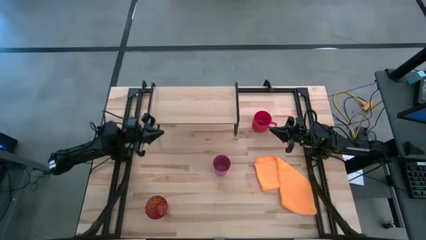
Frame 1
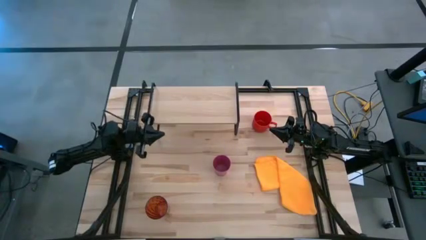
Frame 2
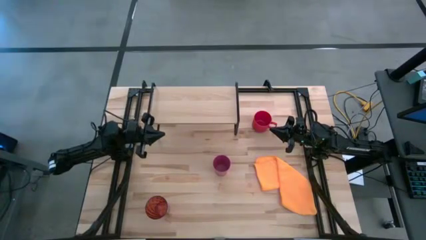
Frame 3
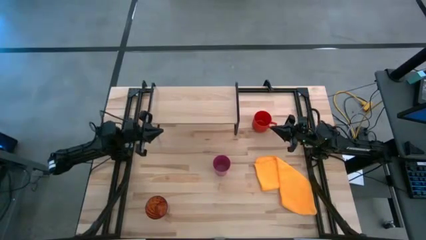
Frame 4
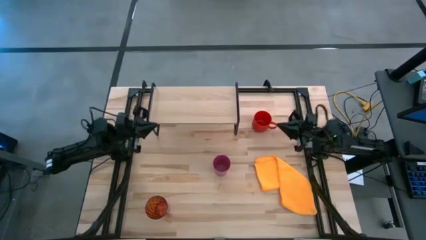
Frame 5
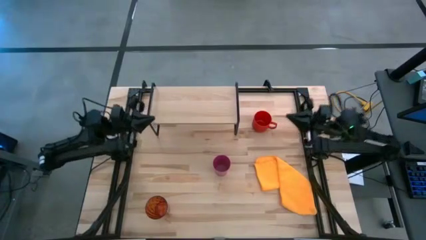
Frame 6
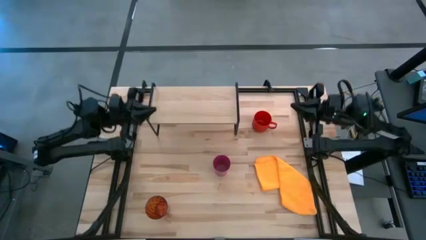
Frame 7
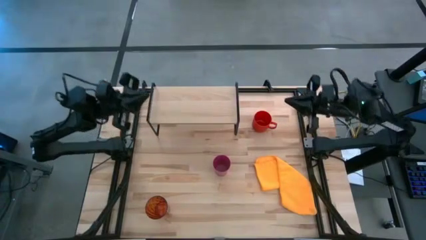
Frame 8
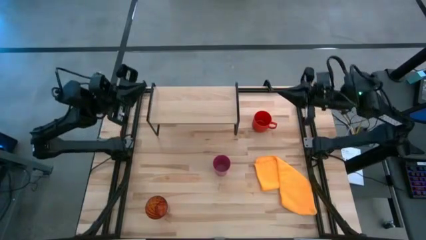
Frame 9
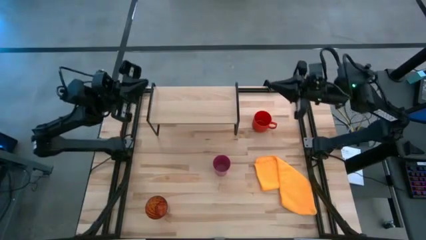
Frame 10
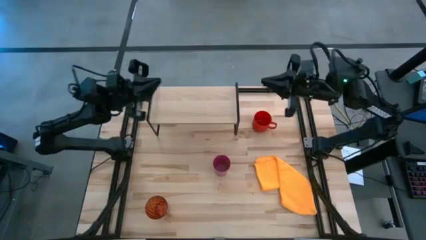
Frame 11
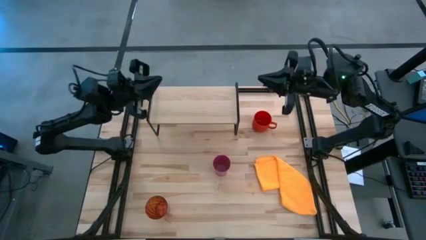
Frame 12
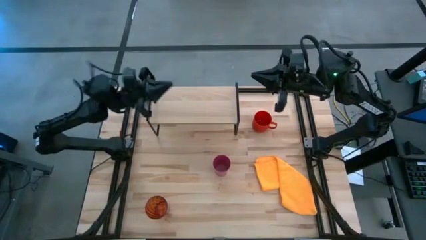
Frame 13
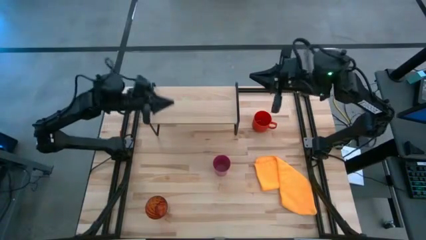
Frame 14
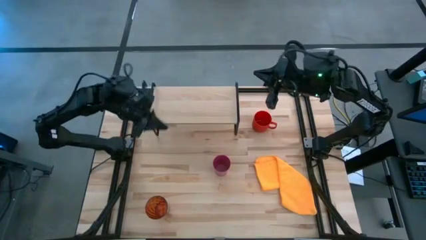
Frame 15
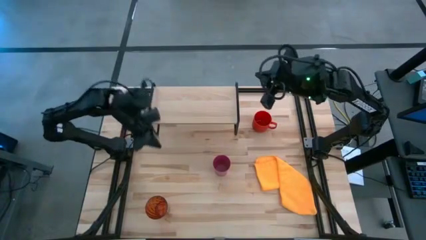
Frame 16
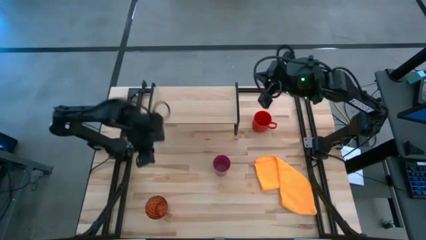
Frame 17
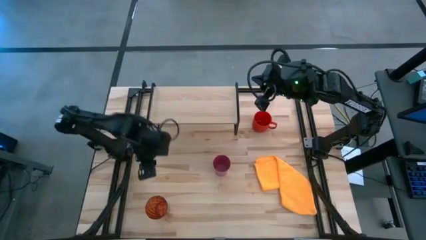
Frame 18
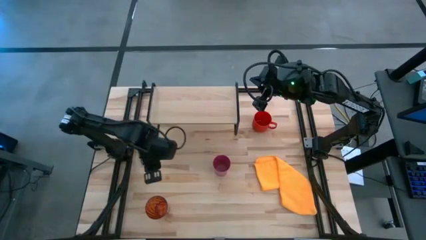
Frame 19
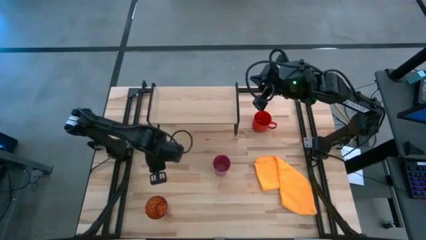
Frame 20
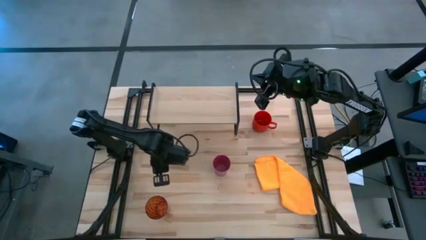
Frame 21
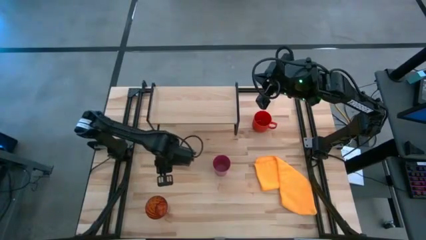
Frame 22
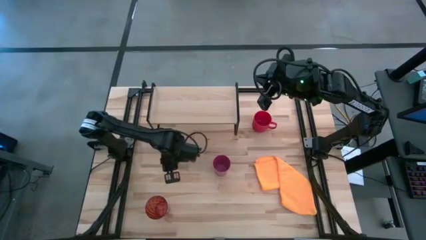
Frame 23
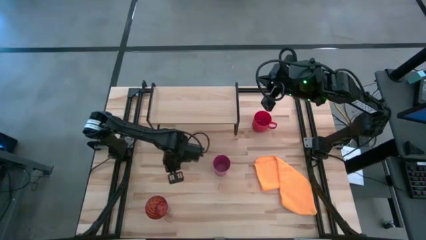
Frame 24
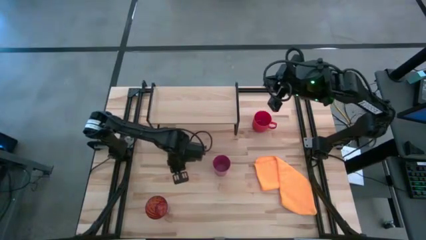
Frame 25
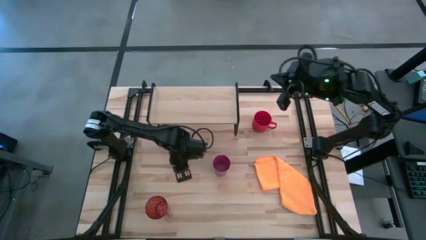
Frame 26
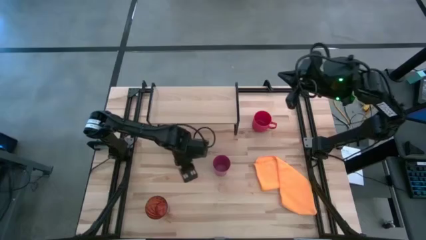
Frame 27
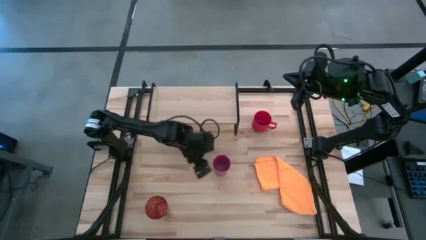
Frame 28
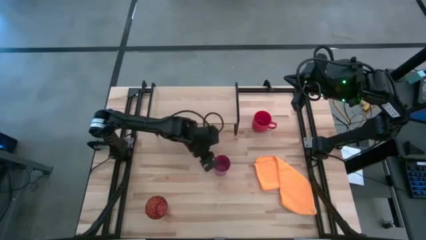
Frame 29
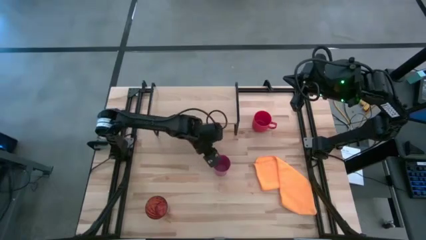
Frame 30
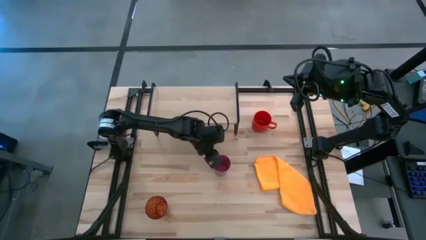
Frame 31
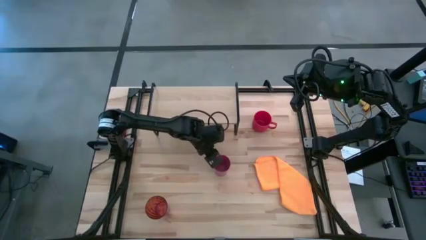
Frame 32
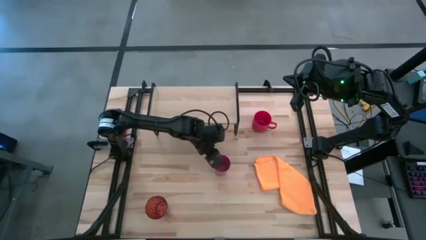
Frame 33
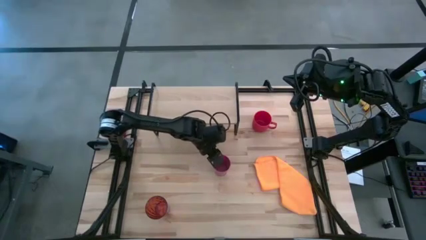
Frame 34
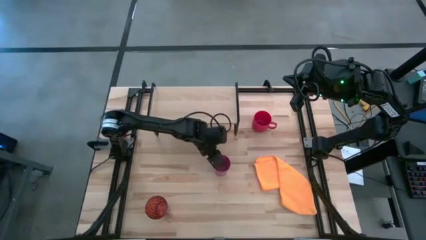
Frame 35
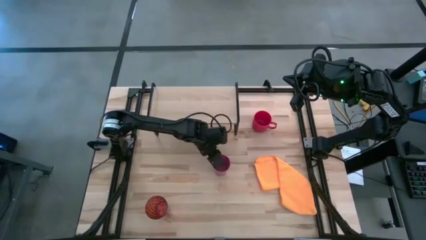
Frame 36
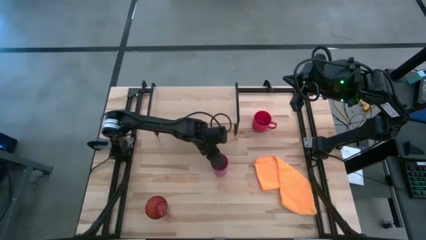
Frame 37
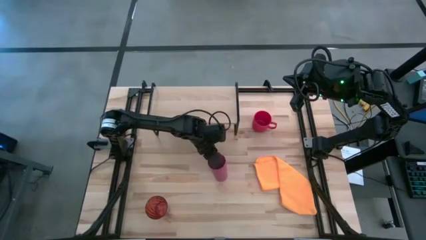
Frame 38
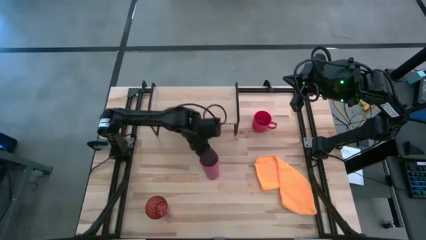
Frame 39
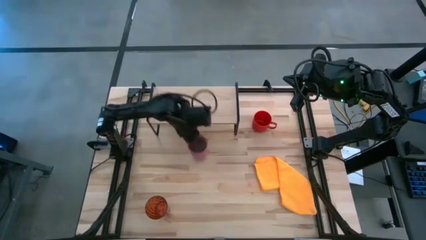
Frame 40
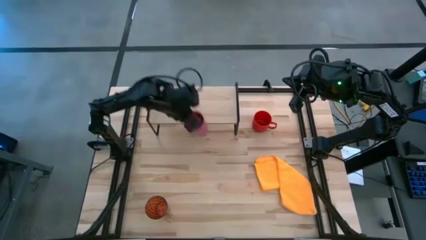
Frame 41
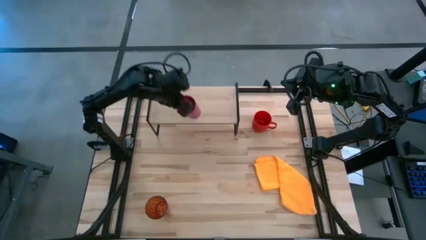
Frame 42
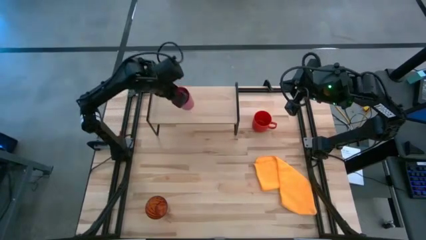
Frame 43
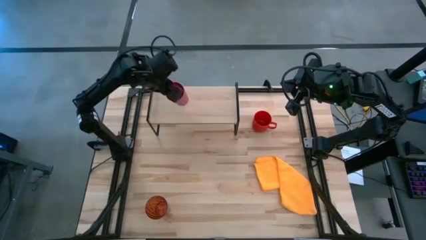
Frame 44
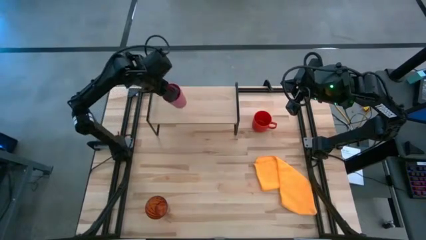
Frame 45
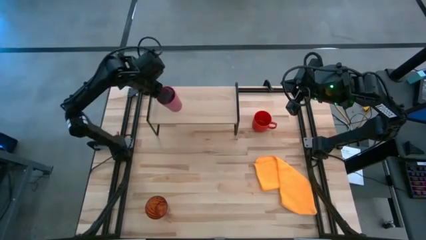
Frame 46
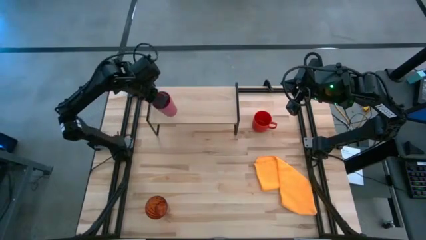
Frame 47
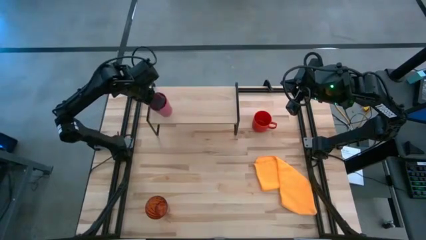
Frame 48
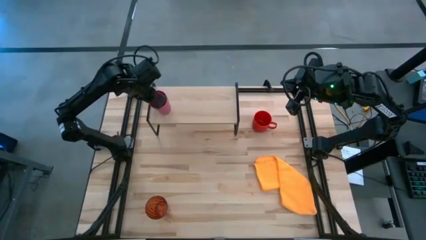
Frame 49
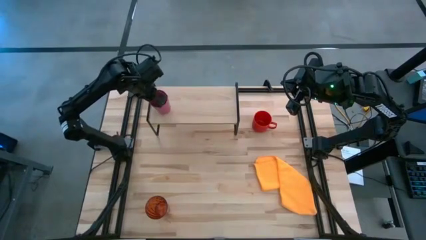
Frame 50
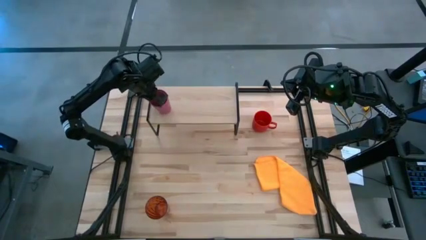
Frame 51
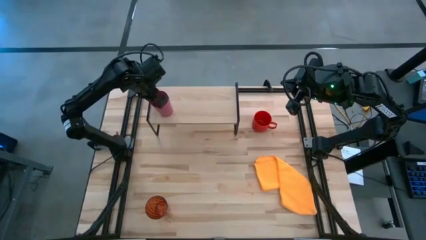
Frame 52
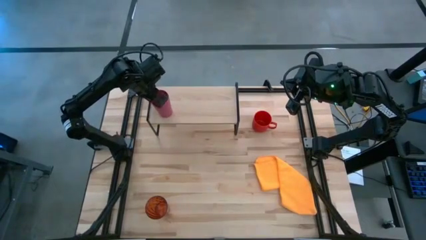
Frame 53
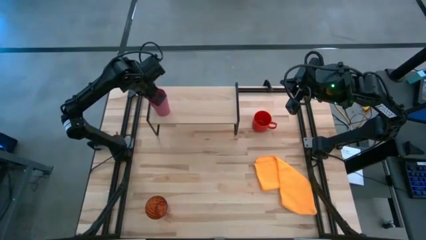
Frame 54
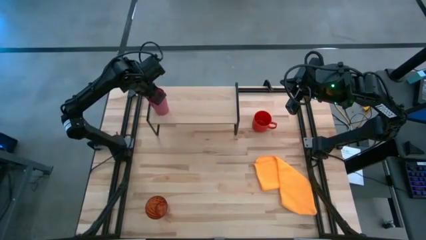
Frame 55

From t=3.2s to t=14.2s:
Task: Stack small to large cups/mugs on shelf
Put the pink cup on the shelf

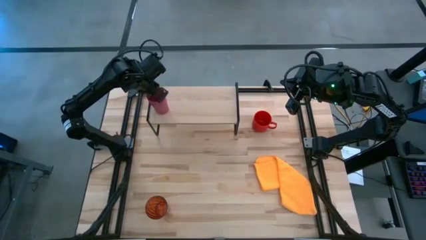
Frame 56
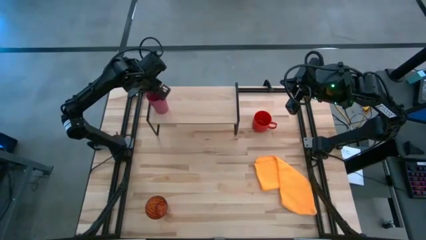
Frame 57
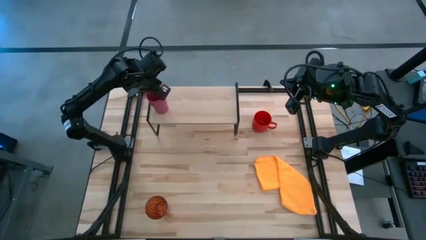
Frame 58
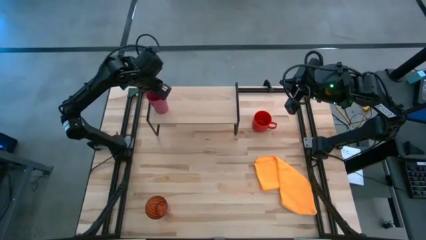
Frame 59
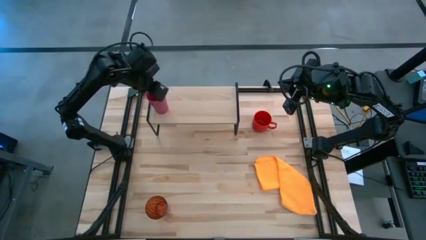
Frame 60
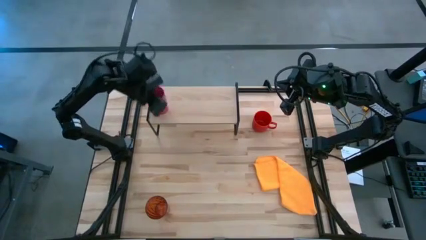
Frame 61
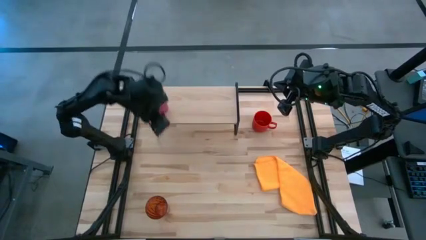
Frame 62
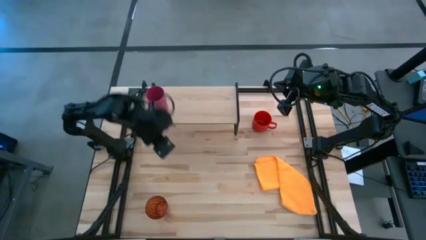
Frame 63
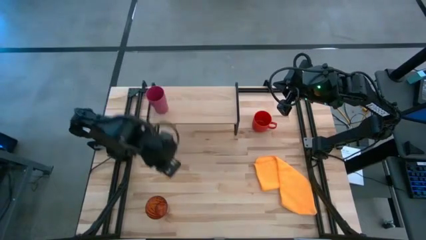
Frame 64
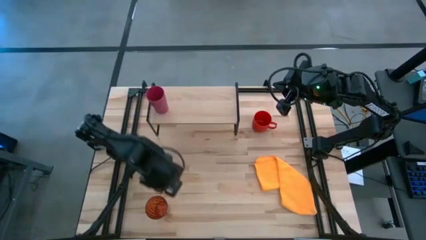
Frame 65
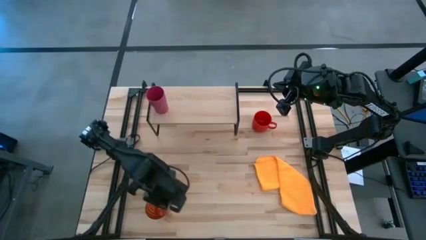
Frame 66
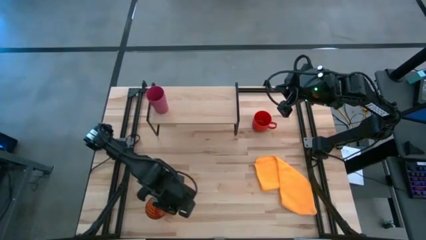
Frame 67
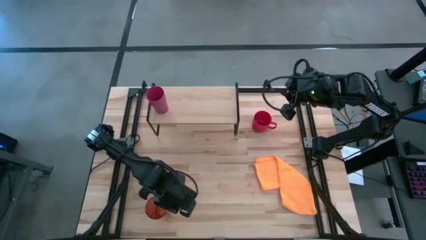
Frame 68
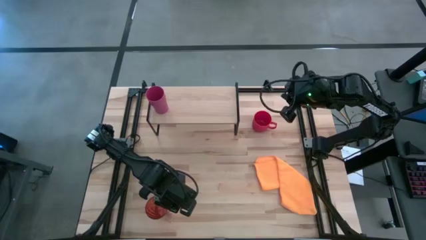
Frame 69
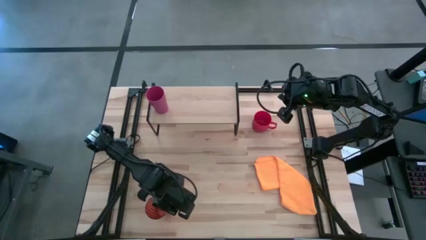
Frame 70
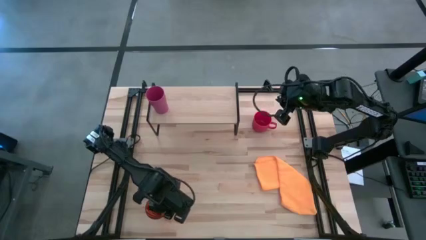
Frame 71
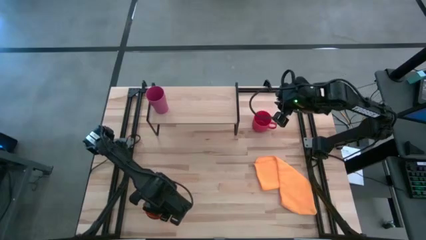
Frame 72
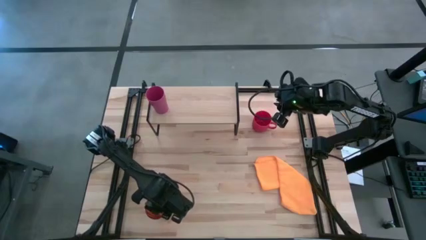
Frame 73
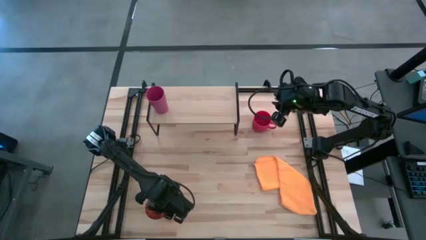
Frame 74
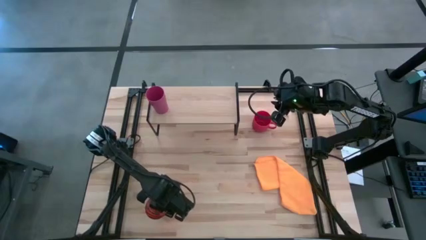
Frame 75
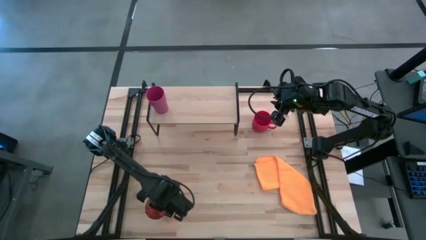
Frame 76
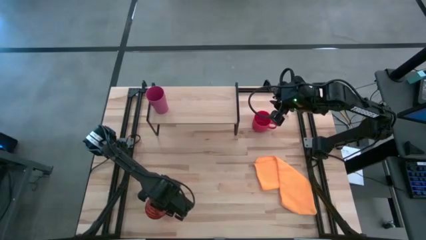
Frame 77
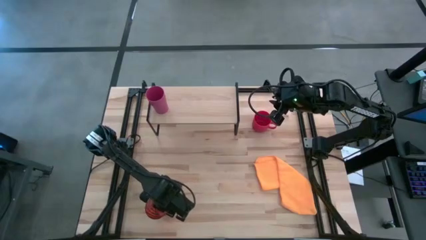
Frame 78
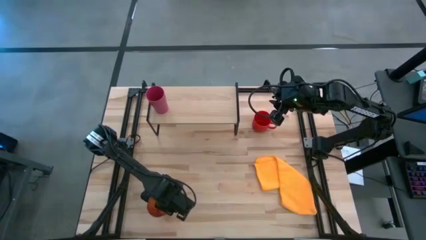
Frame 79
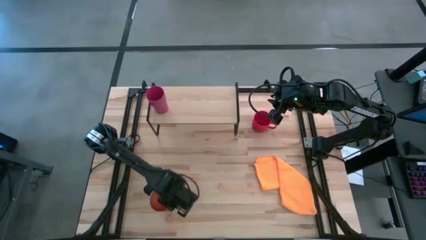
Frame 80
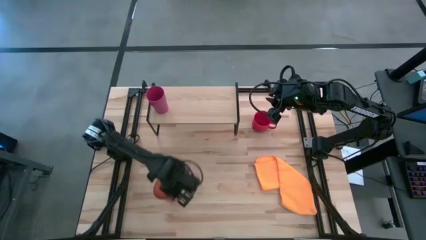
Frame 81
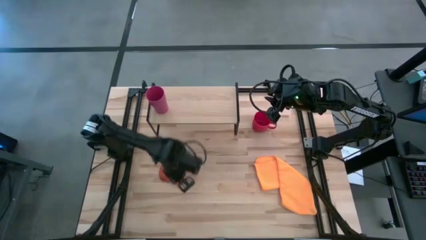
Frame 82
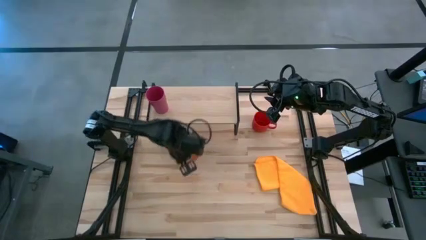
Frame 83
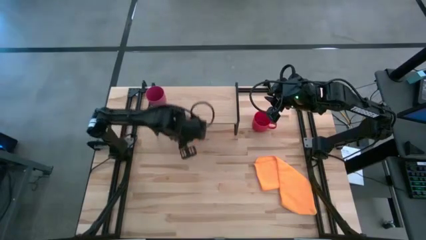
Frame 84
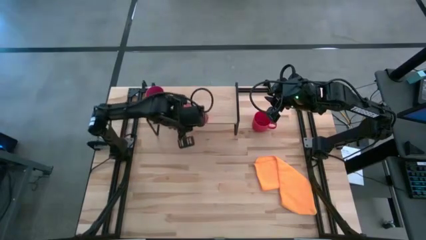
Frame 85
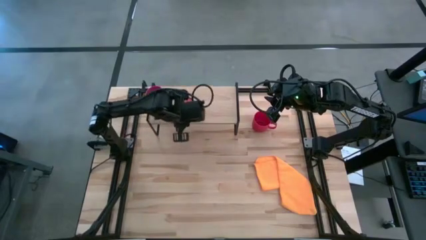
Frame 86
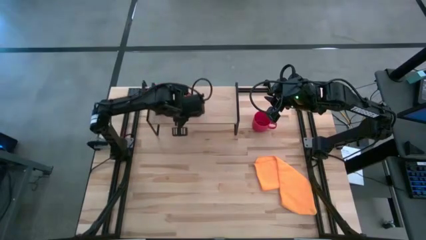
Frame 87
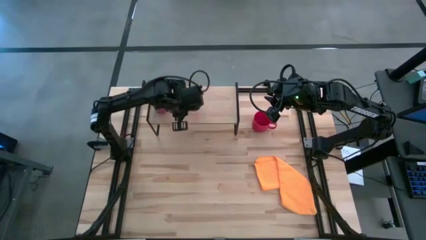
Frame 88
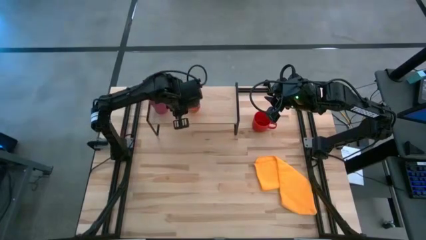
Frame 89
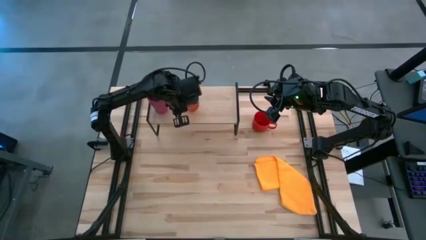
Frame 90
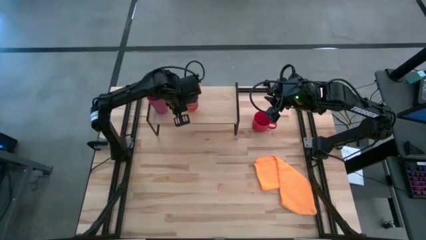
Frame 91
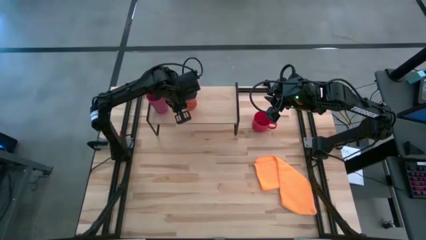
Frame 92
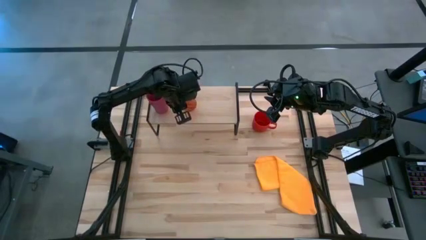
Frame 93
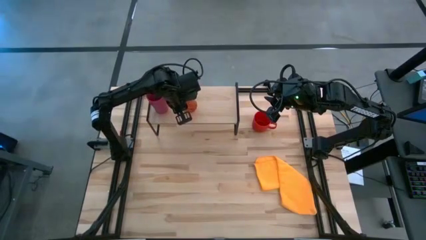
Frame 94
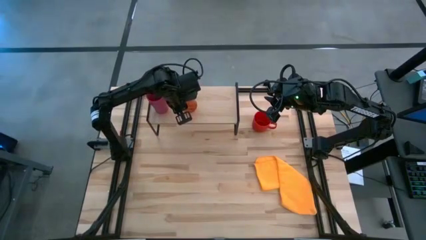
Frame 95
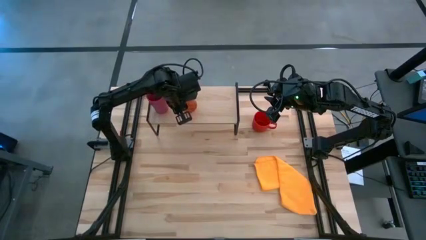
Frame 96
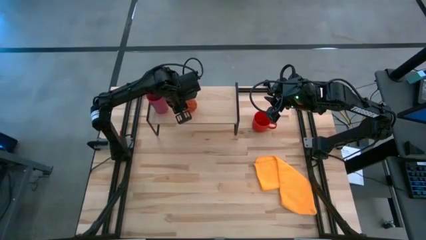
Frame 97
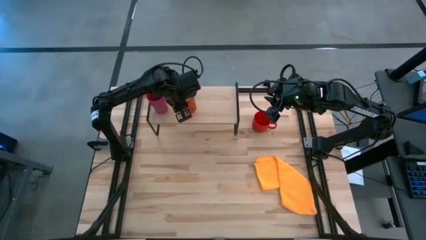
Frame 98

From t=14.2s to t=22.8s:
Put the orange glass on the shelf
